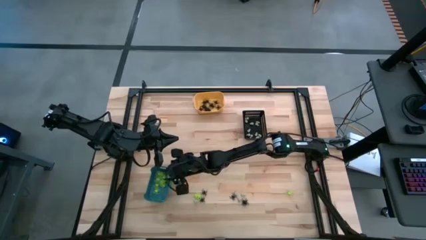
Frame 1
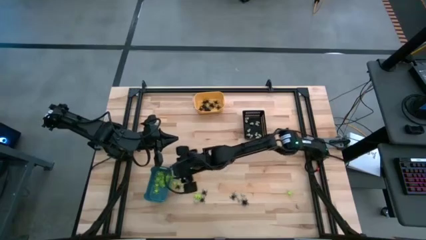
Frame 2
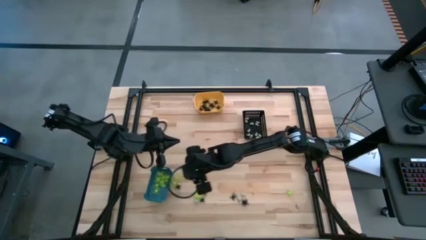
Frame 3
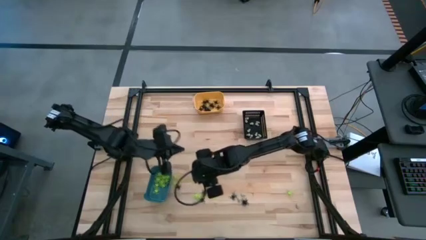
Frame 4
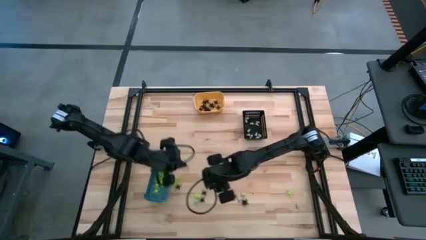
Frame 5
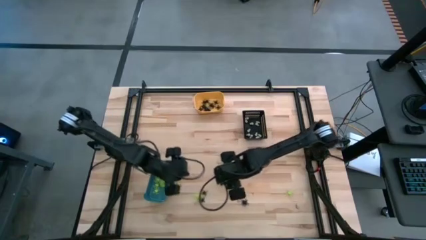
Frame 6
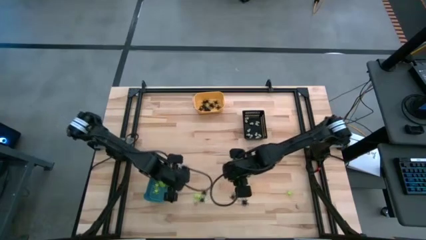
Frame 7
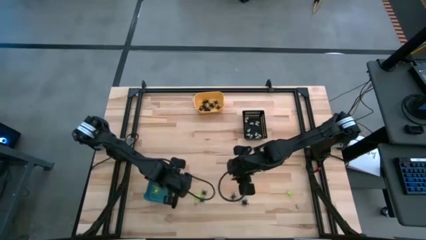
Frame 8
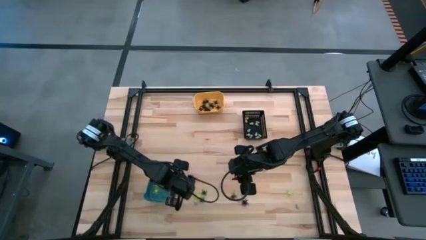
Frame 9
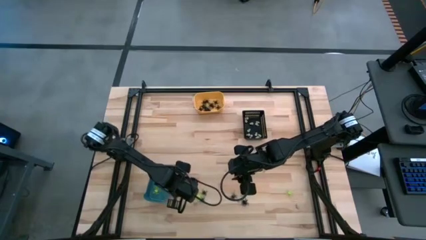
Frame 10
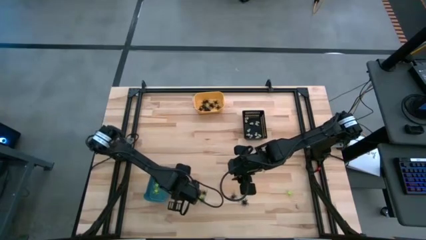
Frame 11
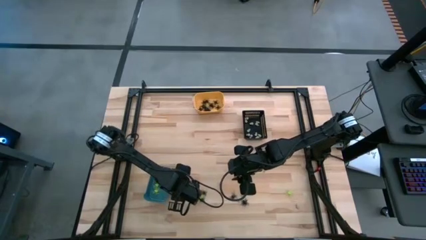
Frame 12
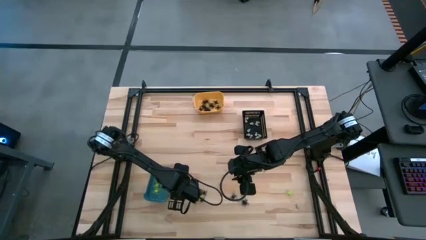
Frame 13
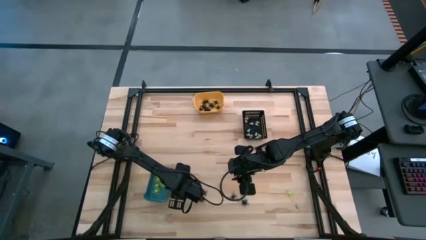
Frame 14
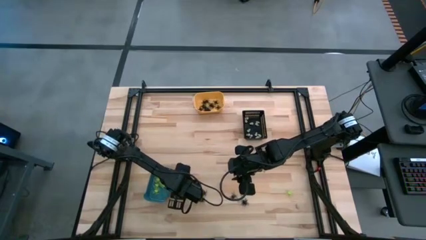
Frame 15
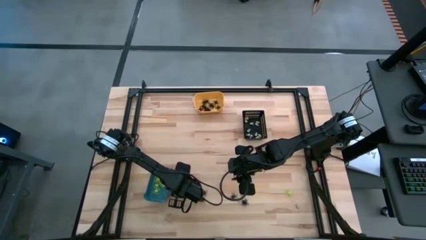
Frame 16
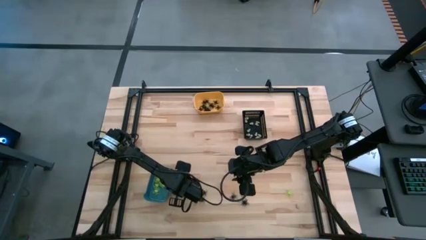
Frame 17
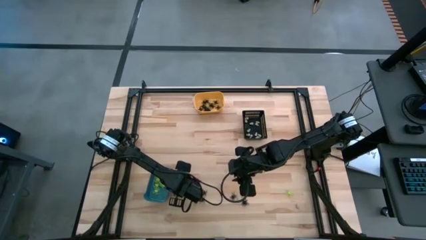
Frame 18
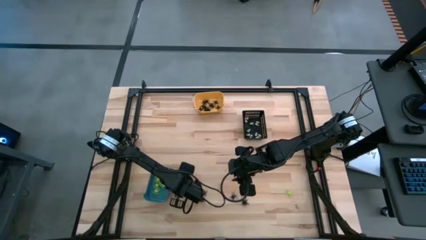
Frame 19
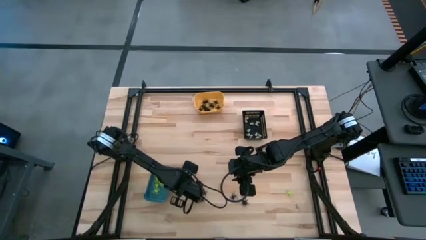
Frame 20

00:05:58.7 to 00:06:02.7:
Task: Sort Halloween decoration
Put the black spider toy into the yellow bin

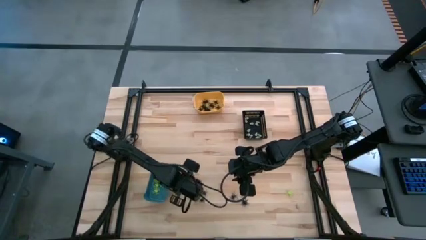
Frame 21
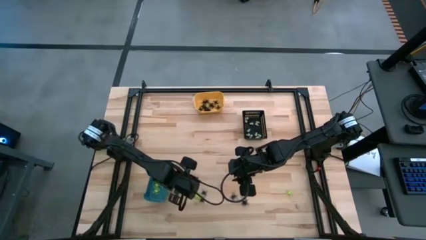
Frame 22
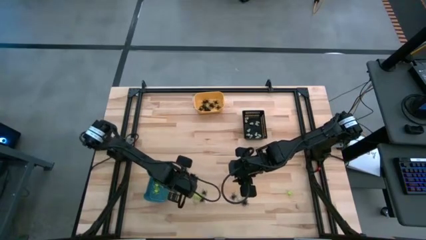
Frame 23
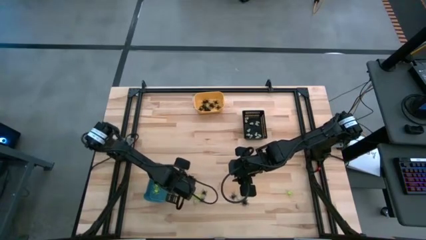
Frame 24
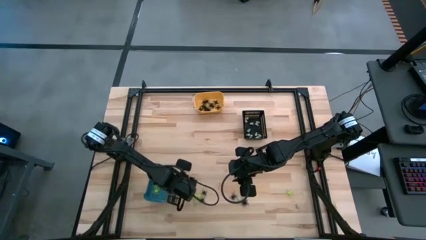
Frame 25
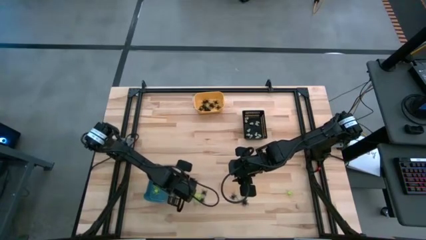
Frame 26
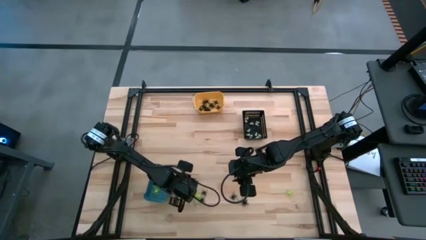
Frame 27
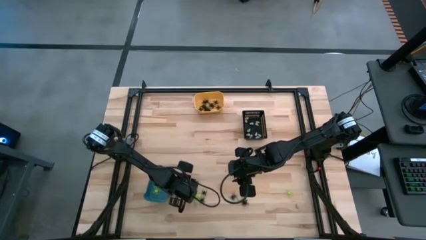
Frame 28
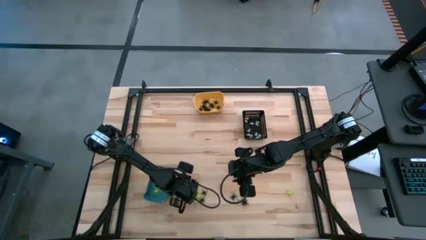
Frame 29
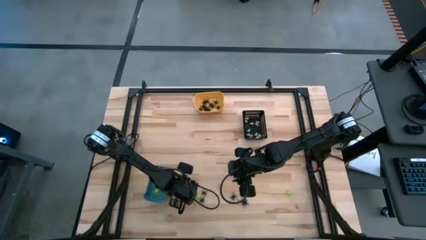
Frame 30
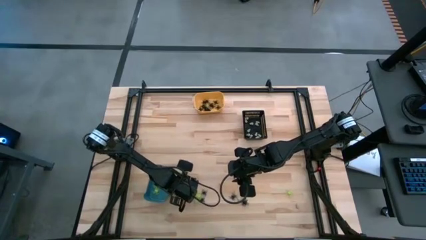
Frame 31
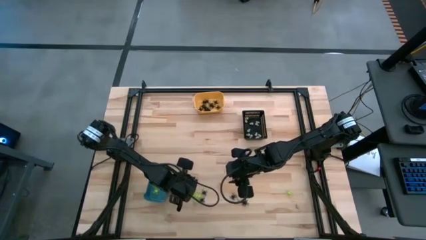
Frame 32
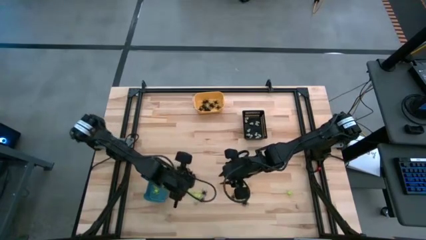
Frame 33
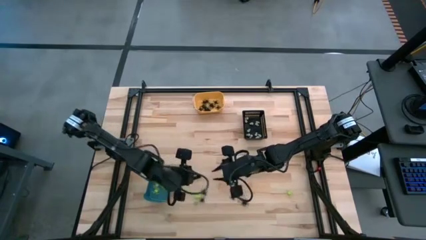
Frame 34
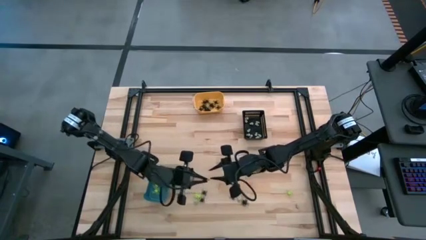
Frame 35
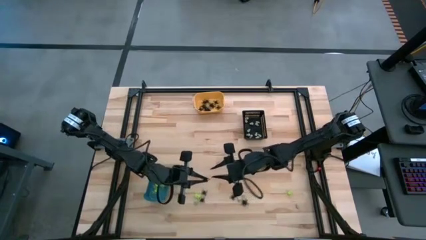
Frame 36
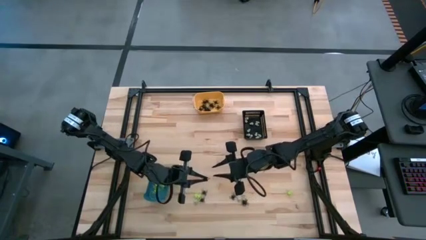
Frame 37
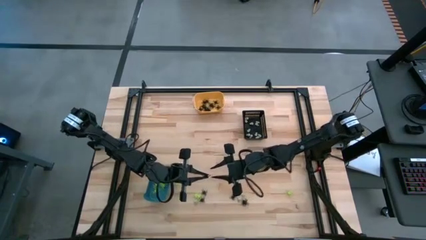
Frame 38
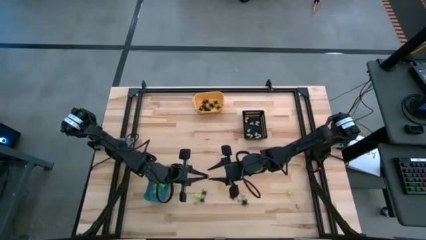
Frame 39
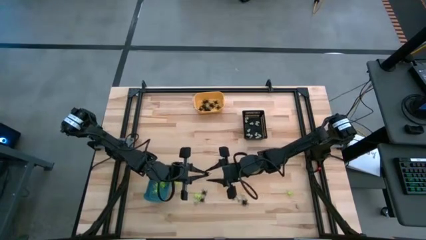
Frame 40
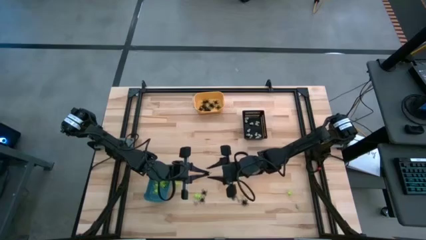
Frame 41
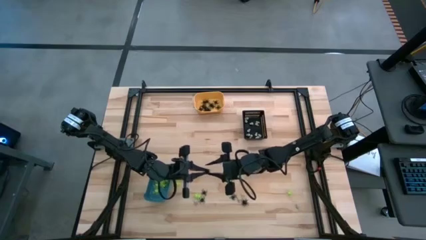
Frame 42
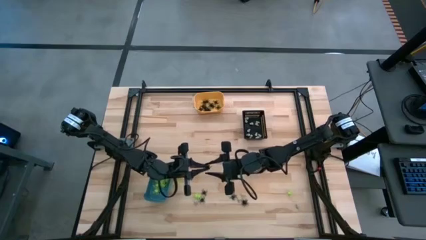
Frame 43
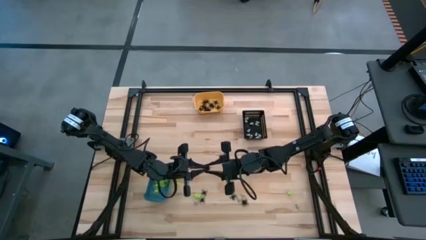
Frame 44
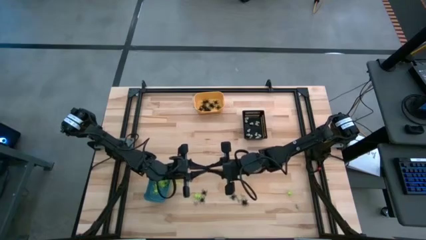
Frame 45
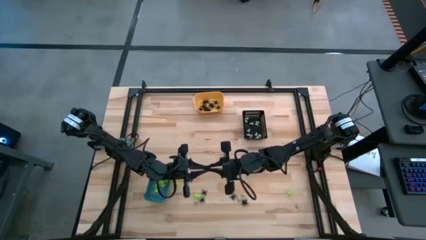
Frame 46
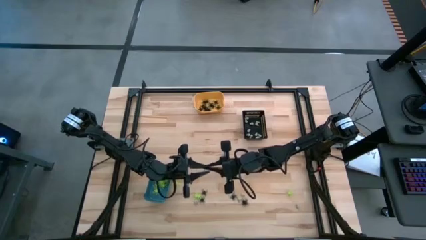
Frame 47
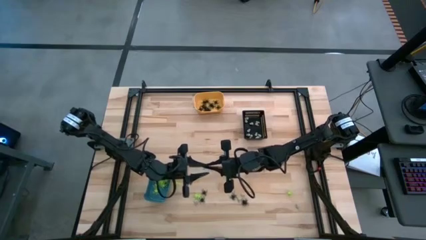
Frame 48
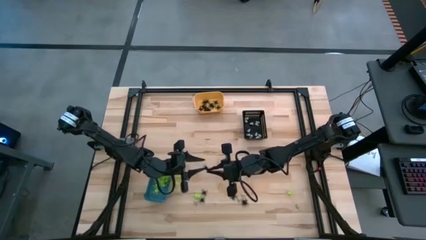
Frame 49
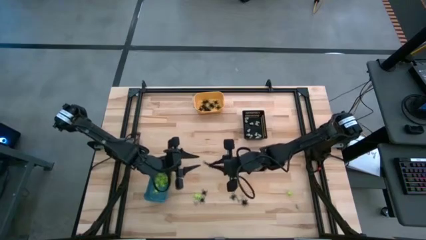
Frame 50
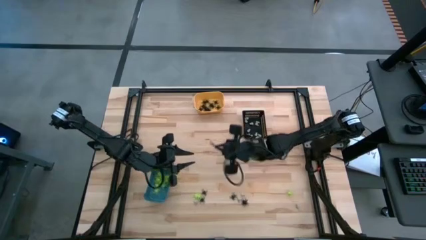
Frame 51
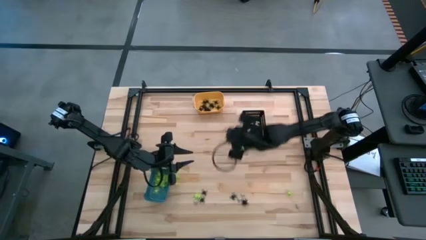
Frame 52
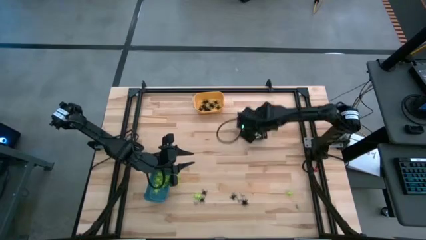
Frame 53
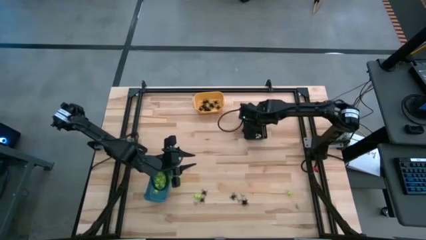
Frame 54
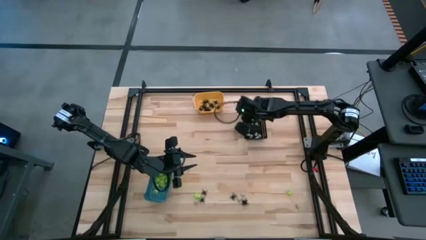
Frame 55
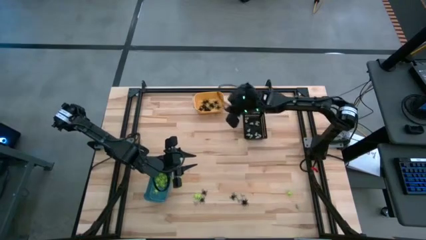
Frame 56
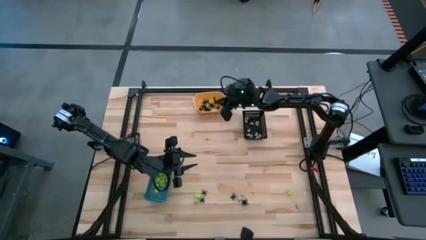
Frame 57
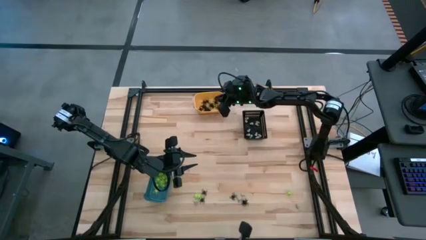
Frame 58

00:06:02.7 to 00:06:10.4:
Put the black spider toy into the yellow bin

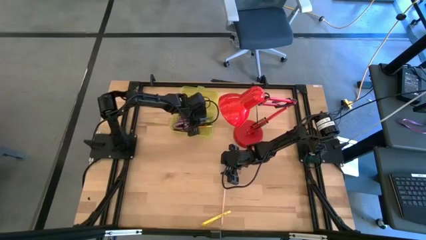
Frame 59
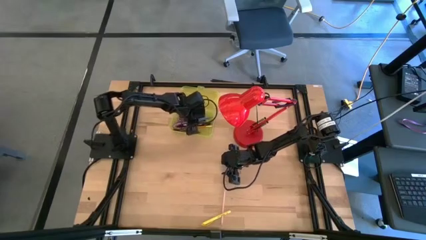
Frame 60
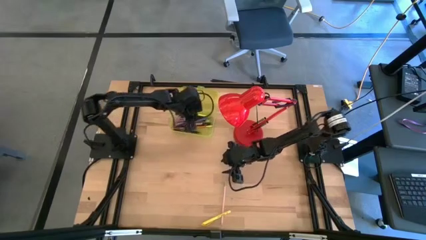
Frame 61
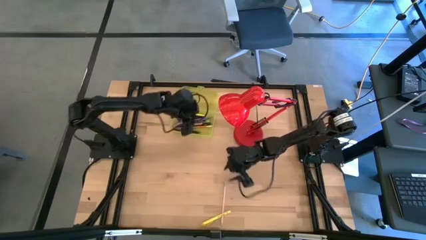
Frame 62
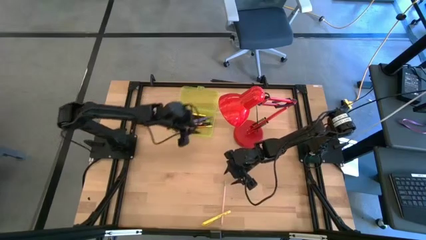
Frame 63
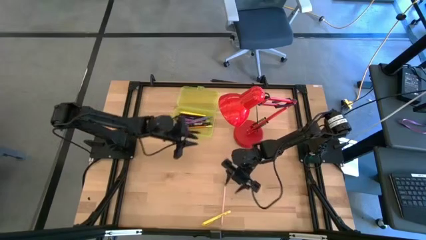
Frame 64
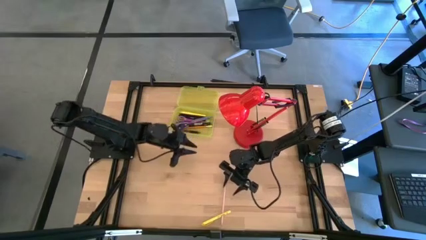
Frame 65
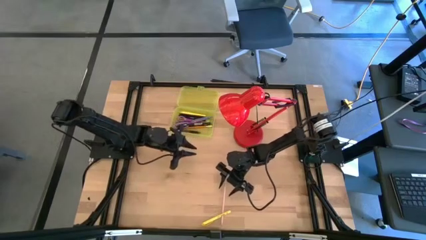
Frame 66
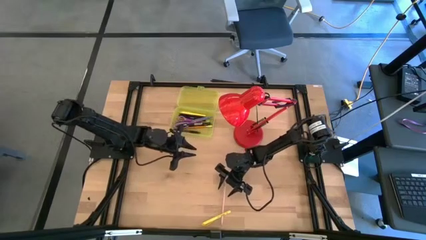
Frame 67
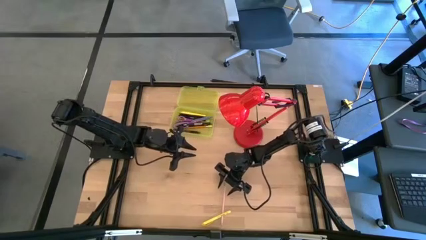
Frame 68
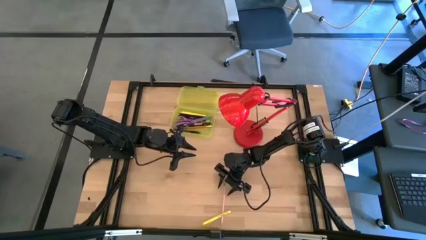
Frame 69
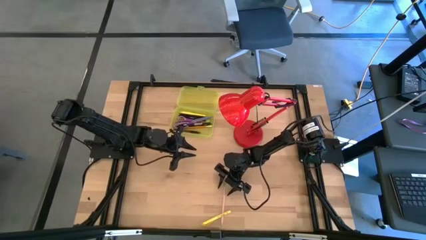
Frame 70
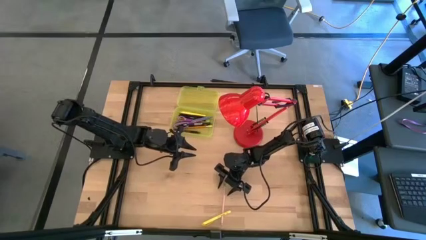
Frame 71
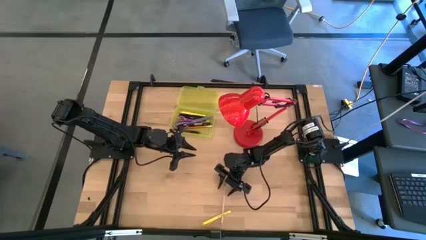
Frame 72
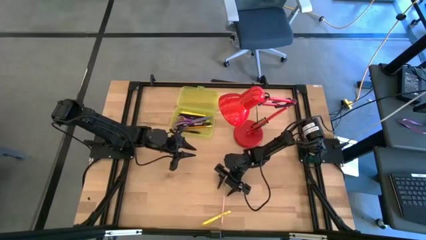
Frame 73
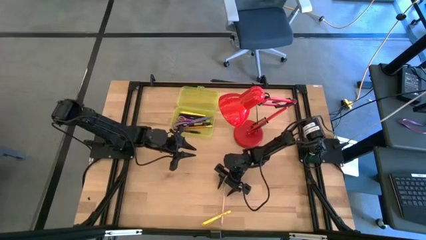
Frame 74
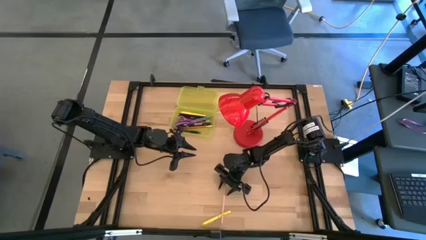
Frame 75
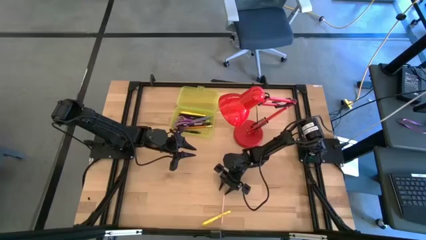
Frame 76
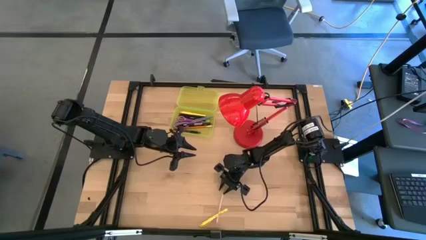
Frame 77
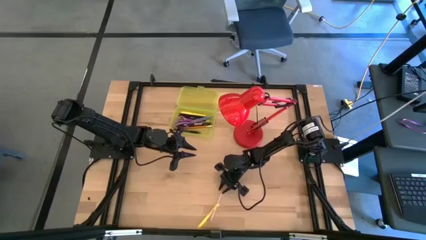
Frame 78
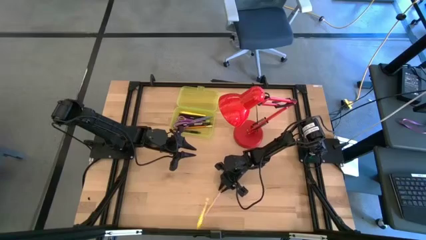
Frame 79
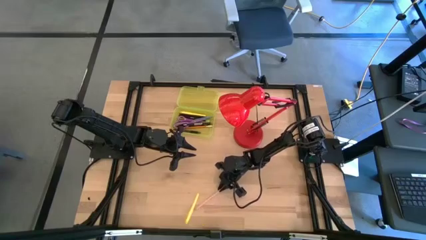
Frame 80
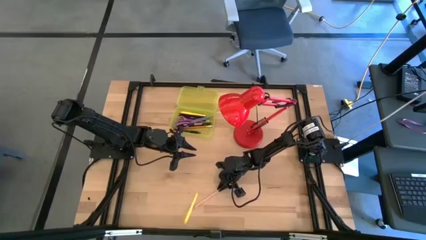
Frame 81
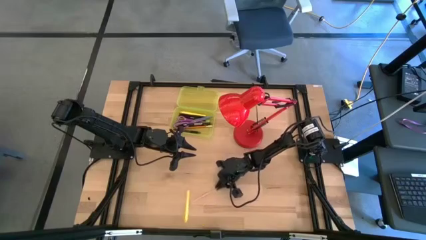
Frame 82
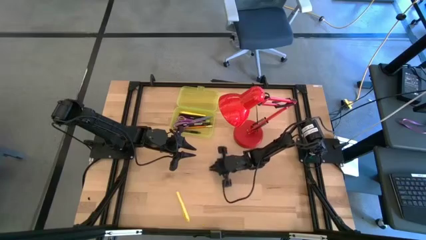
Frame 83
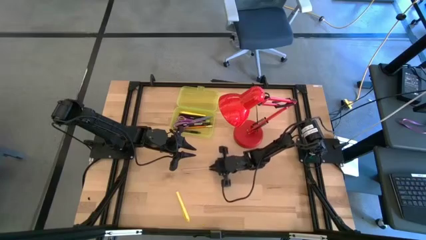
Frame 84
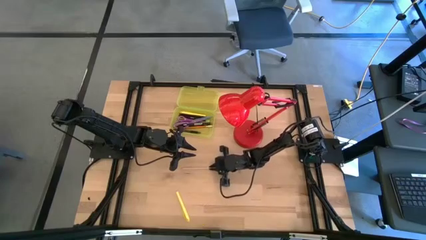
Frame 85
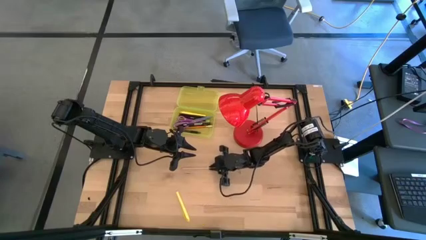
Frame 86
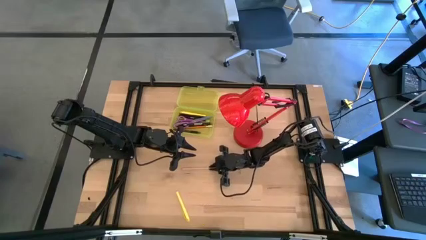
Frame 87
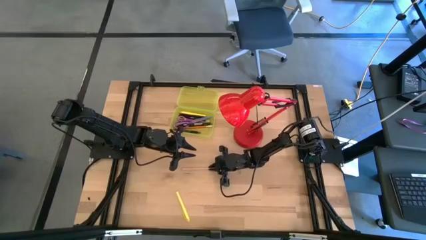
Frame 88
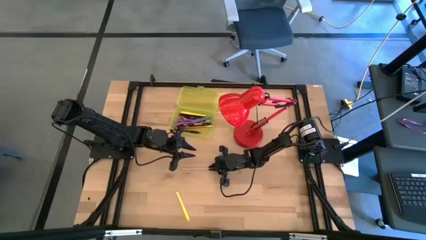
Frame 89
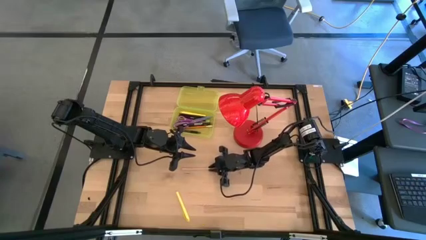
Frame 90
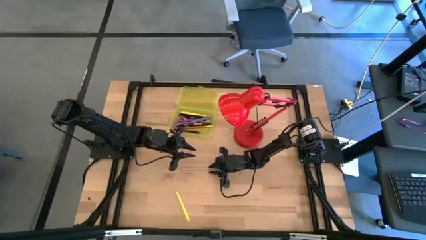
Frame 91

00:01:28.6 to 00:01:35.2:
Task: Pick & place school supplies into a supply box
Put the pink pencil into the yellow supply box
